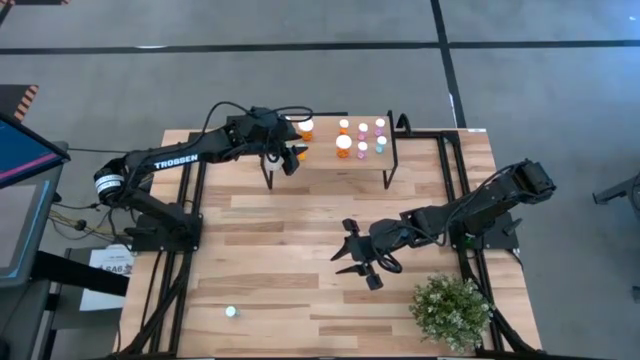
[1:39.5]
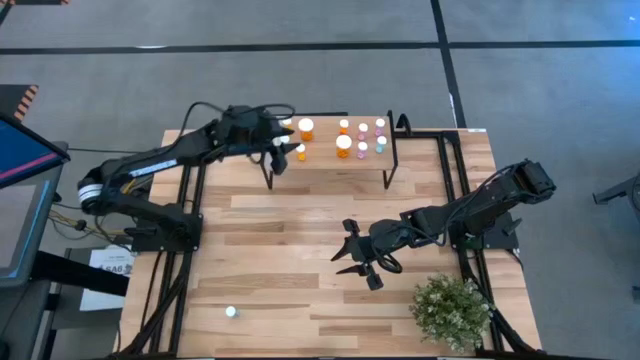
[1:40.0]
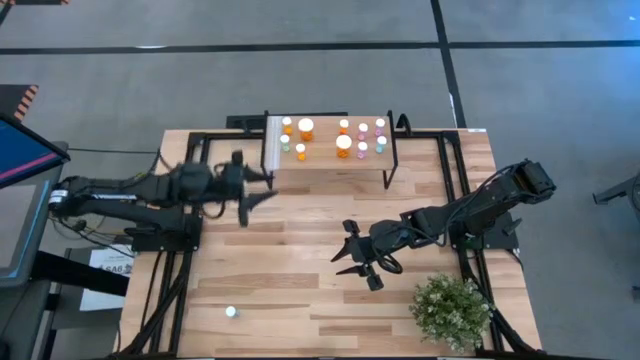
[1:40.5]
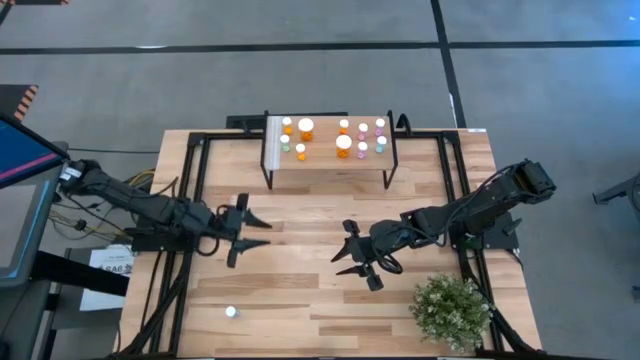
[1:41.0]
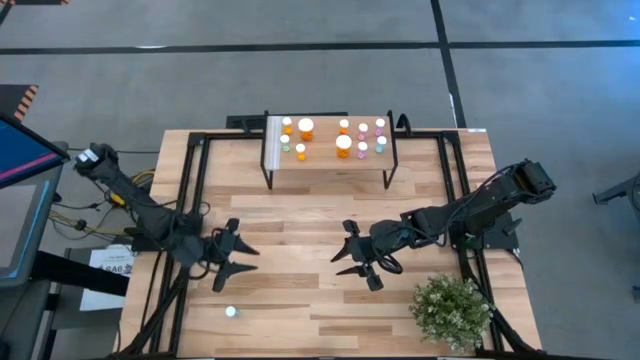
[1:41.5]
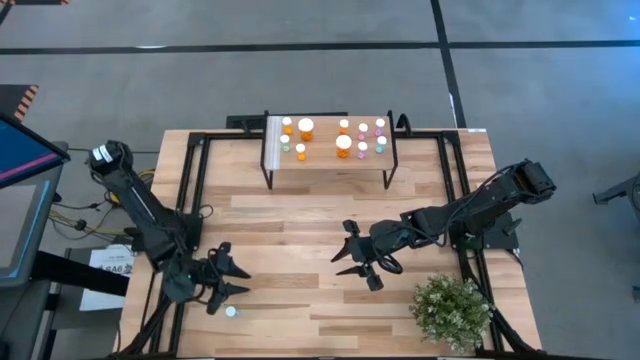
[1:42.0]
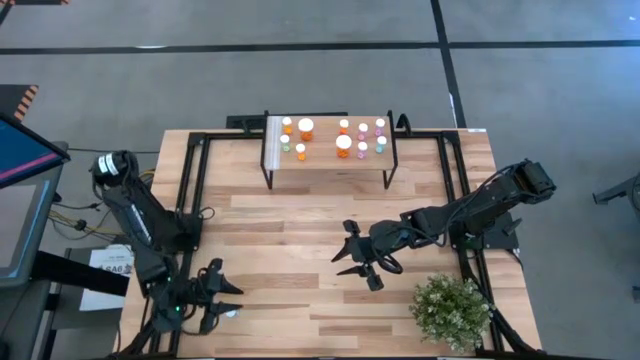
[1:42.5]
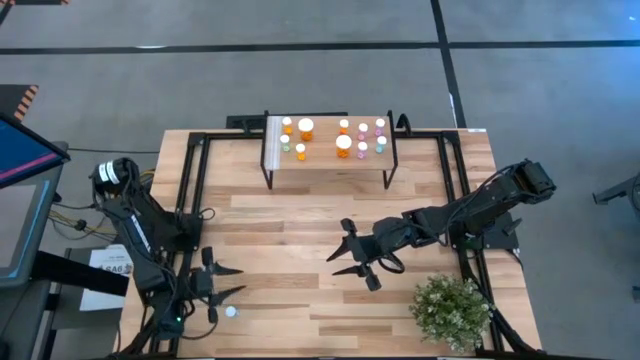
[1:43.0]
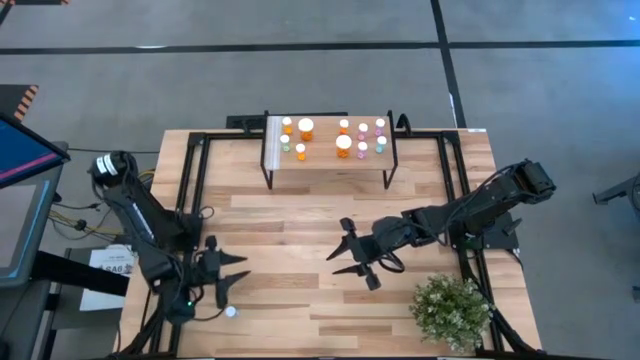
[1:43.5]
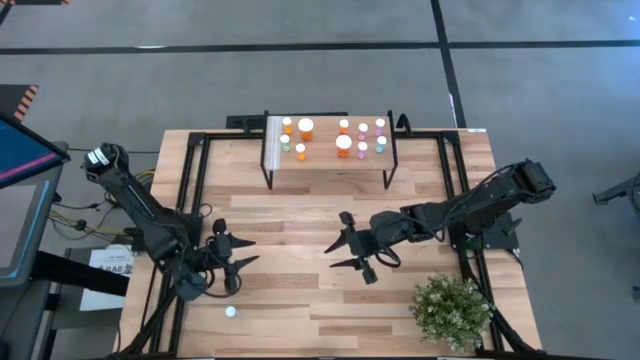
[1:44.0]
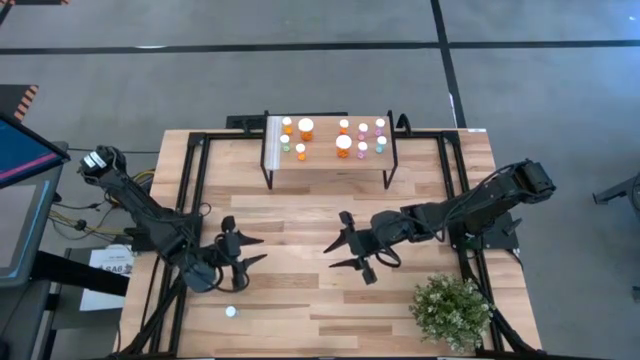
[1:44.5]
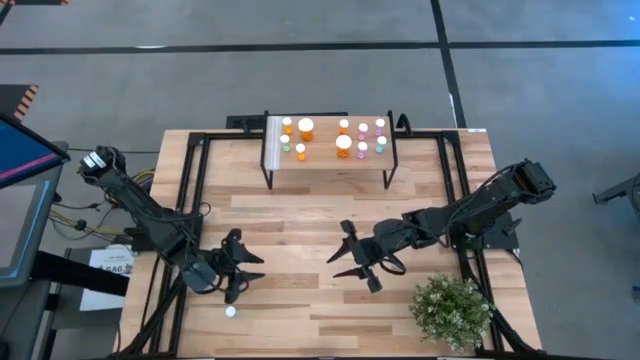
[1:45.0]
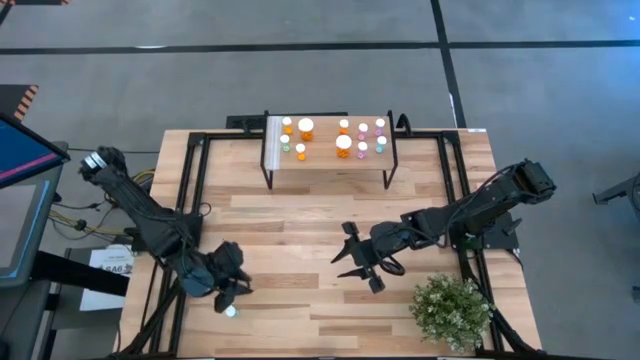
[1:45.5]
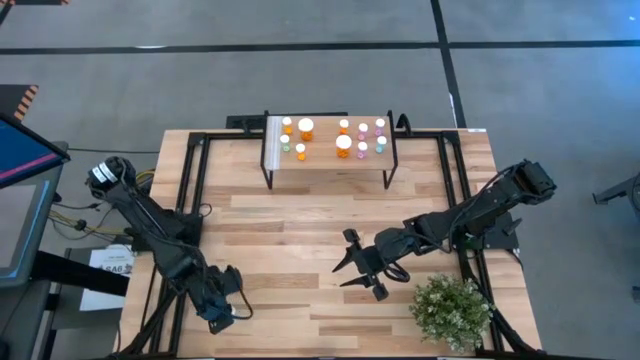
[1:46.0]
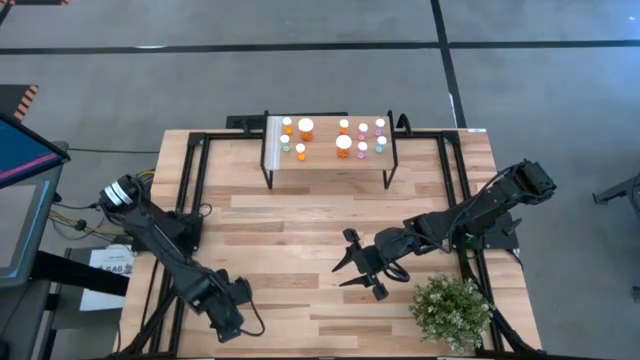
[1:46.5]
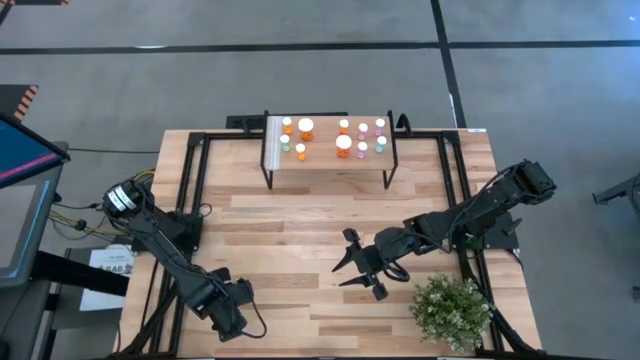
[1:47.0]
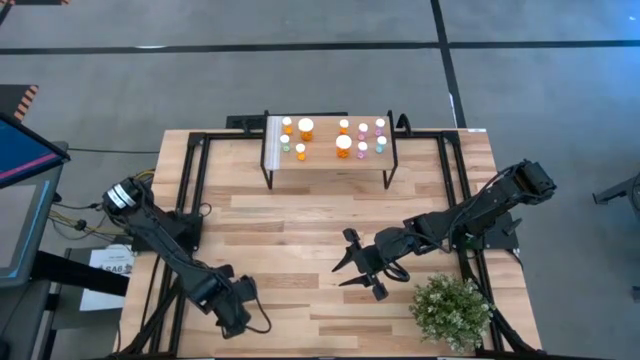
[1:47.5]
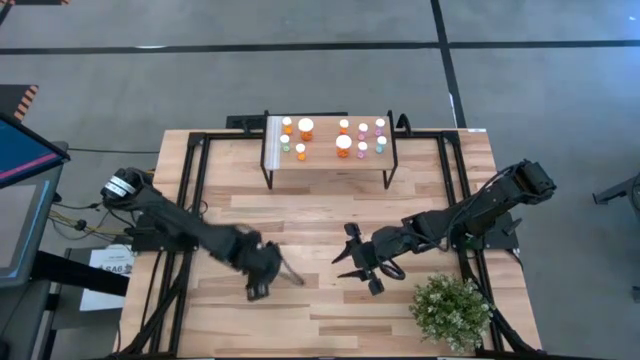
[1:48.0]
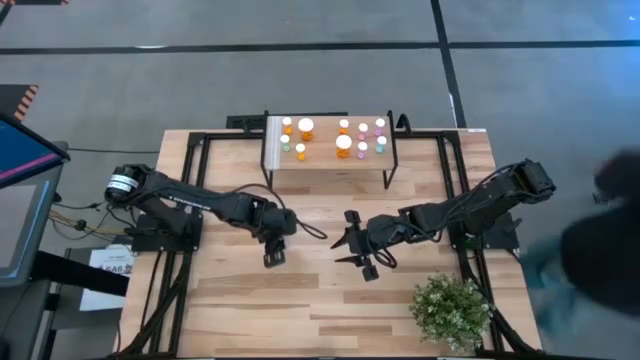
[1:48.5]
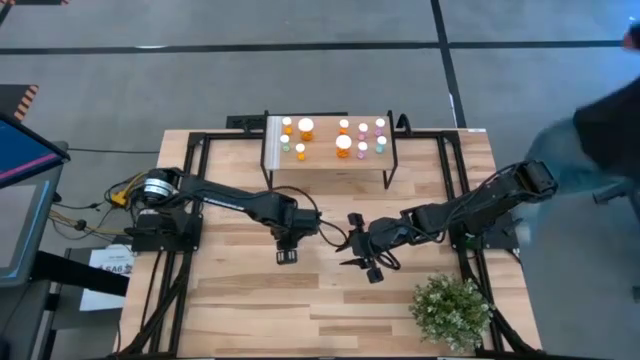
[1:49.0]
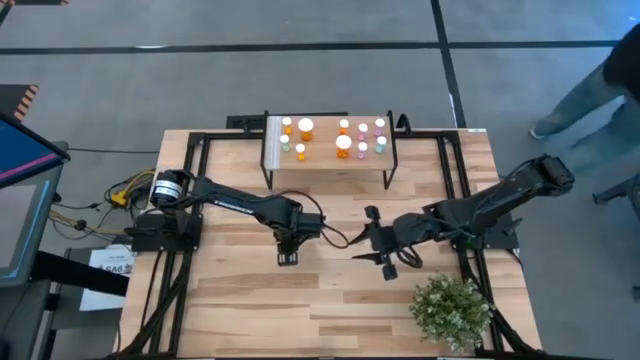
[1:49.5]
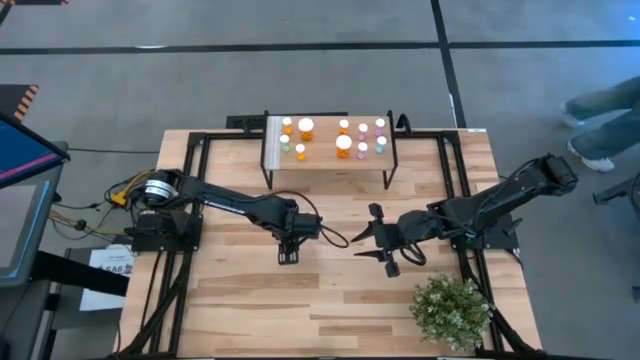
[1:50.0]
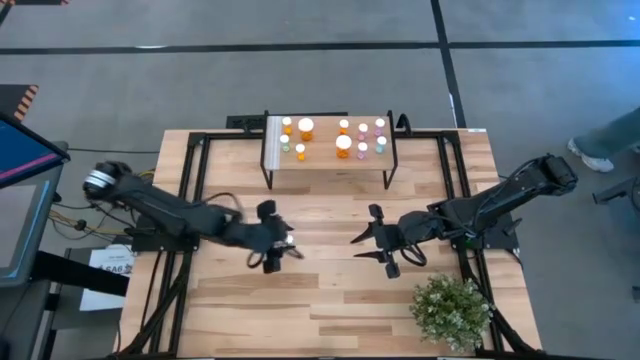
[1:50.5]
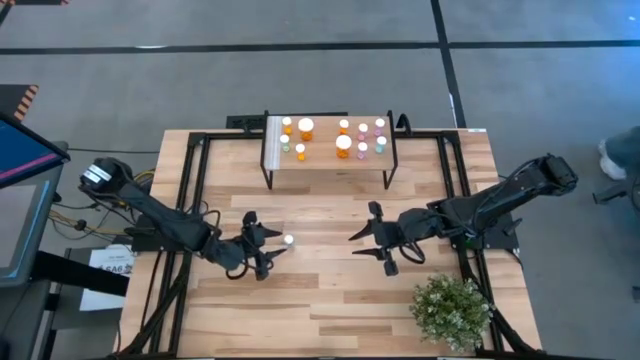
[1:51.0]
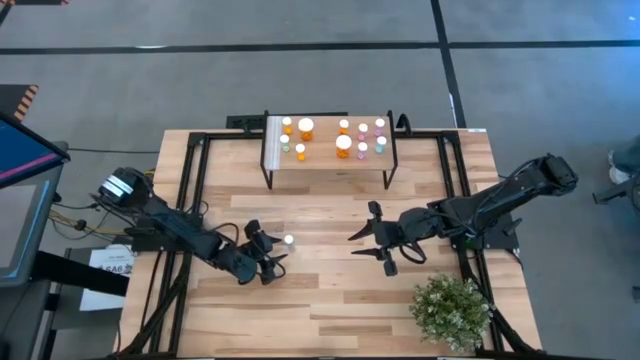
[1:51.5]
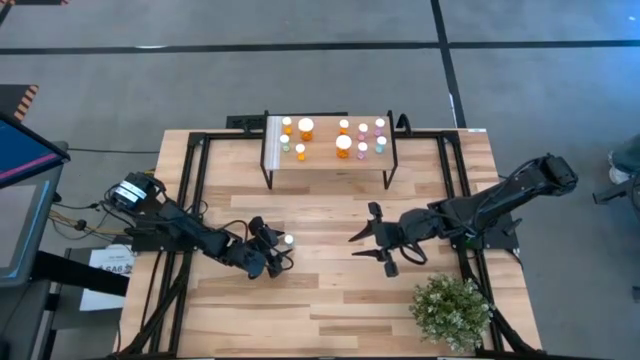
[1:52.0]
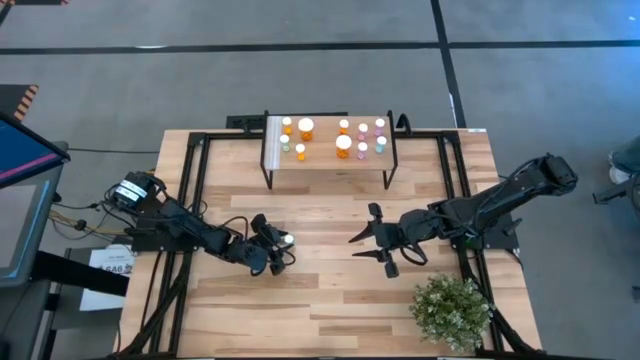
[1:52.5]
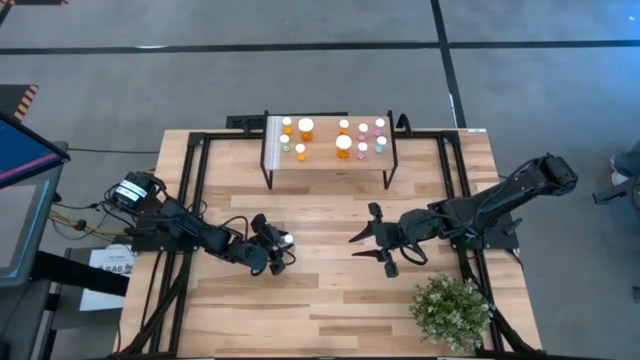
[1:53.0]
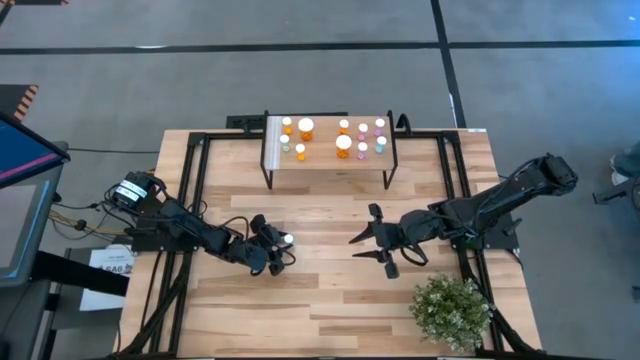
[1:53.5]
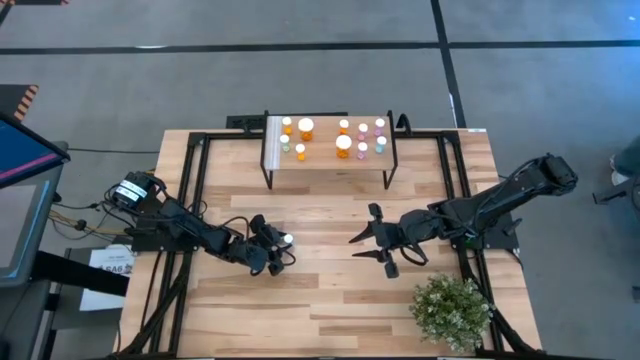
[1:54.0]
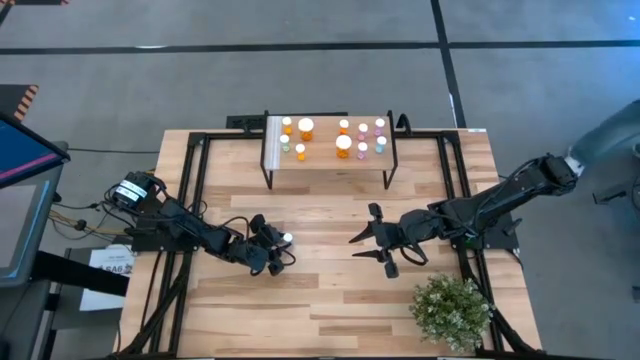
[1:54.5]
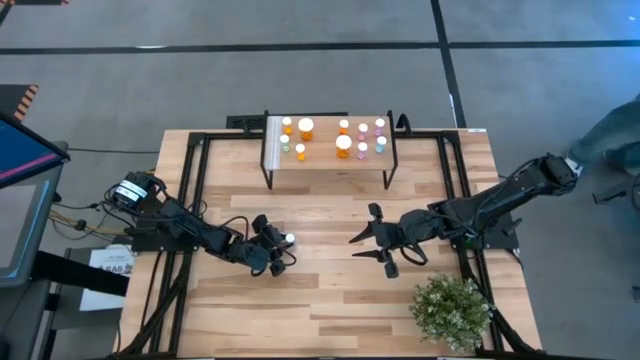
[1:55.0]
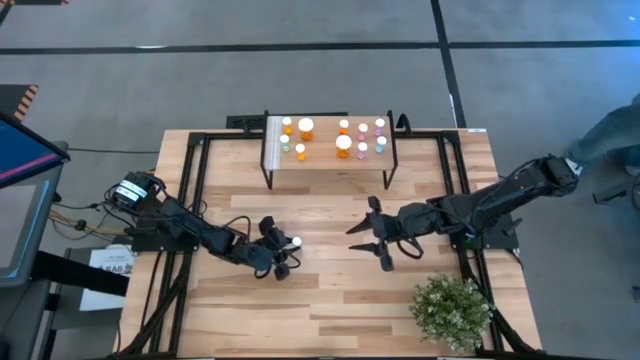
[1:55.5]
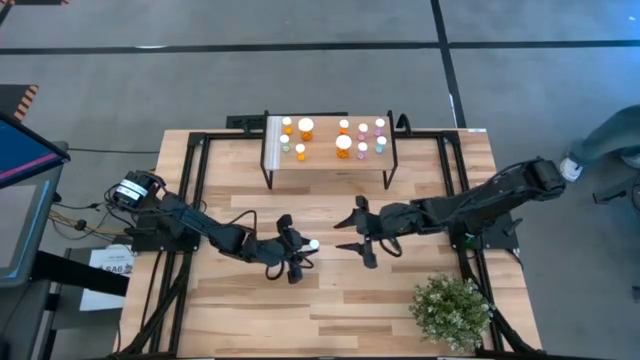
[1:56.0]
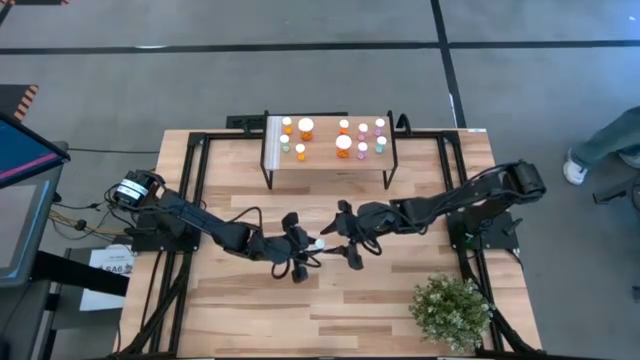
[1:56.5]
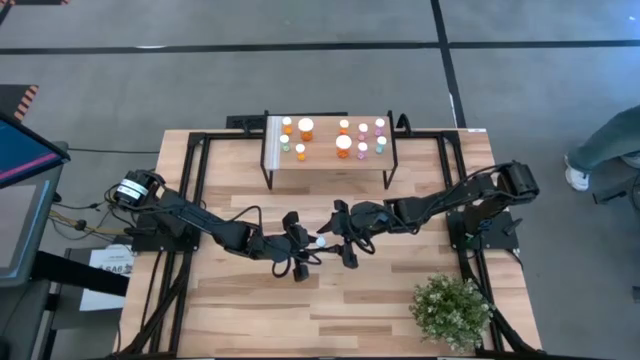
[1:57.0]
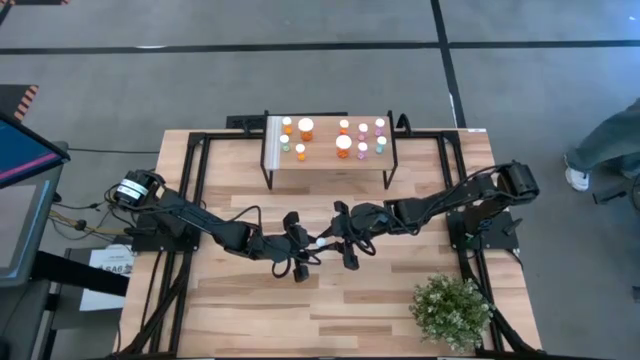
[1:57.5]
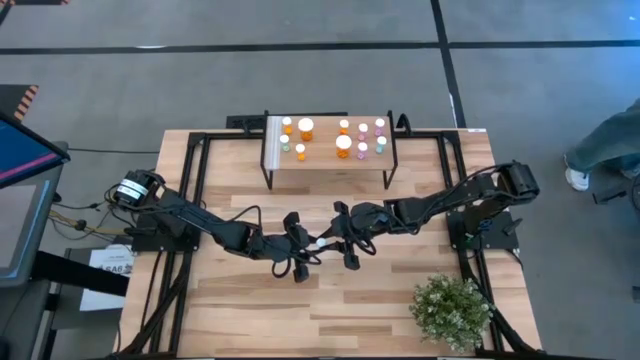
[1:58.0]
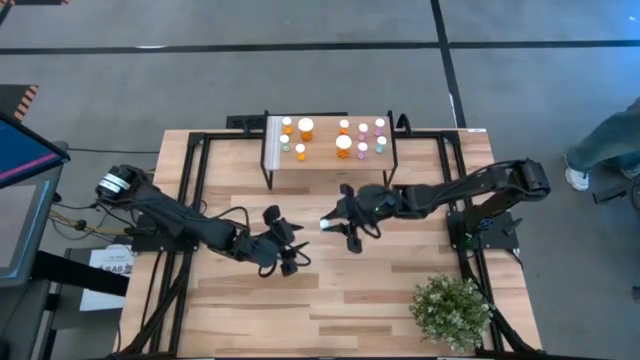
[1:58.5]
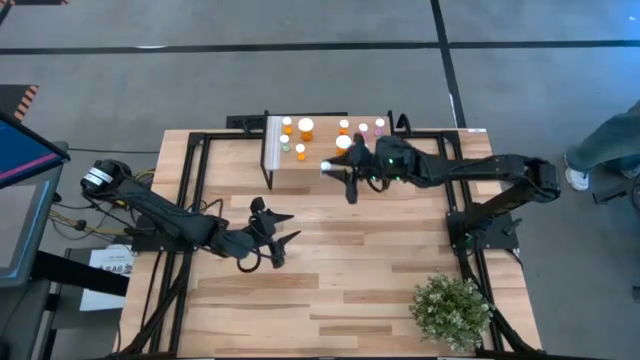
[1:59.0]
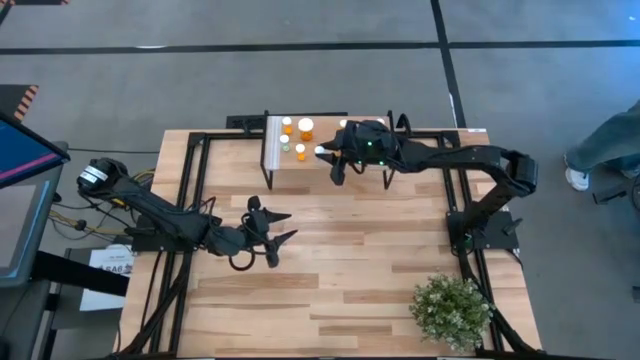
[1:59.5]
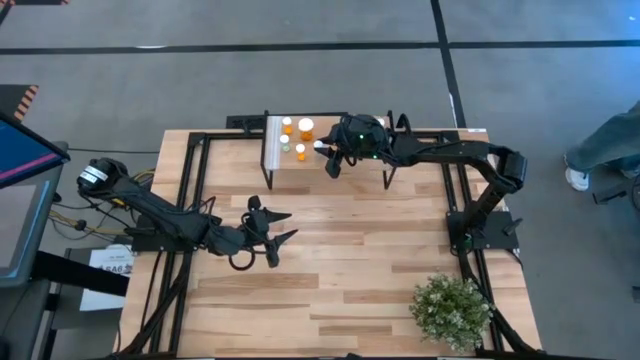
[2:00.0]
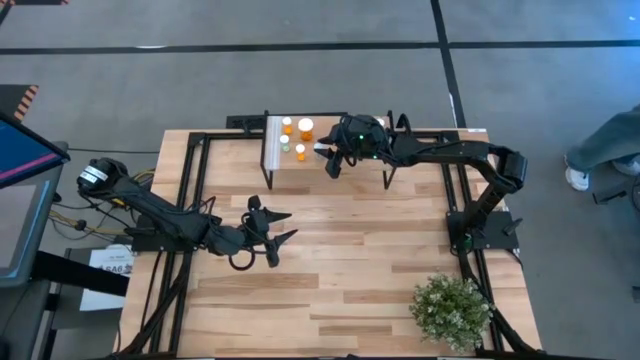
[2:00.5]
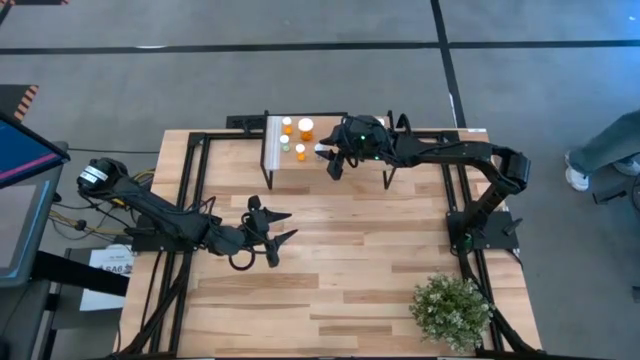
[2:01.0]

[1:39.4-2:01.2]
Task: Pick and place medicine bottles onto shelf by color
Put the green pill bottle on the shelf
